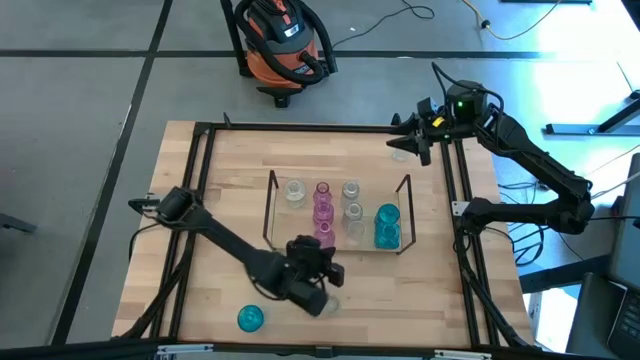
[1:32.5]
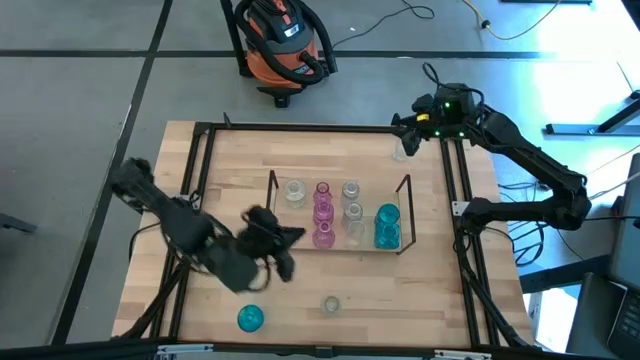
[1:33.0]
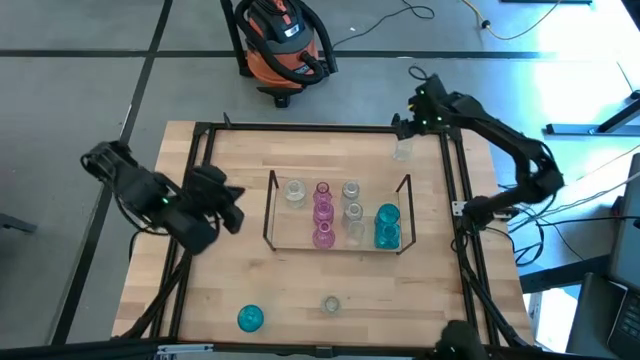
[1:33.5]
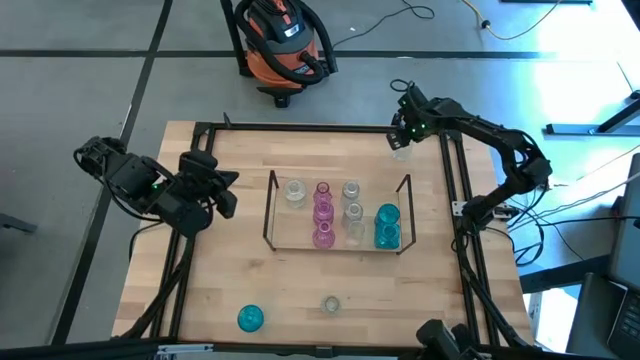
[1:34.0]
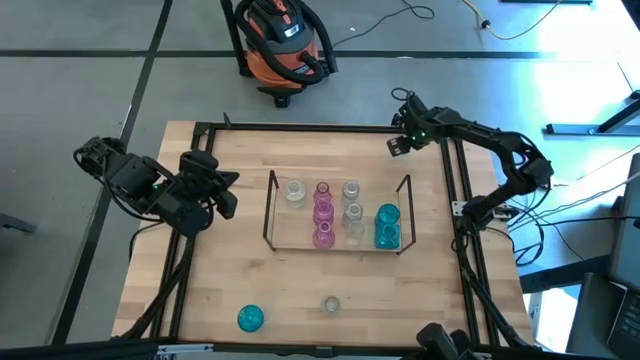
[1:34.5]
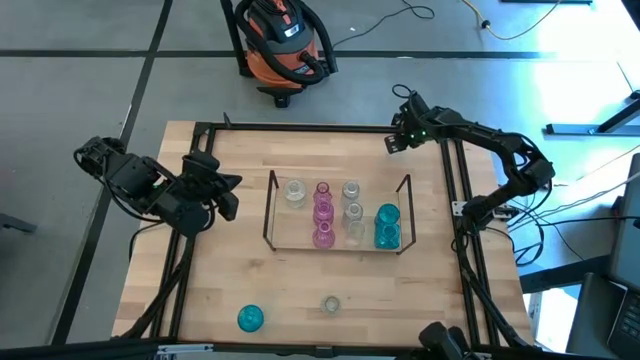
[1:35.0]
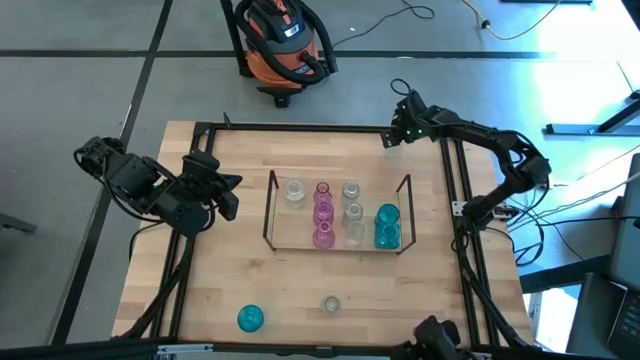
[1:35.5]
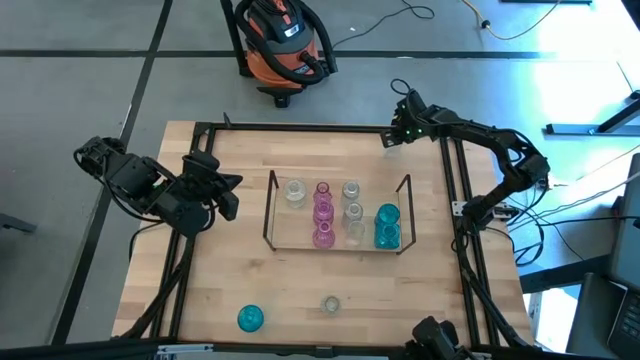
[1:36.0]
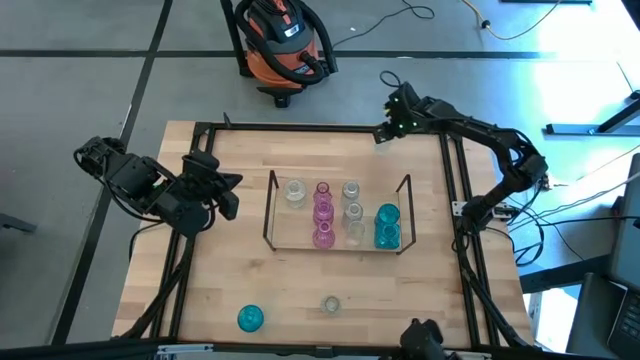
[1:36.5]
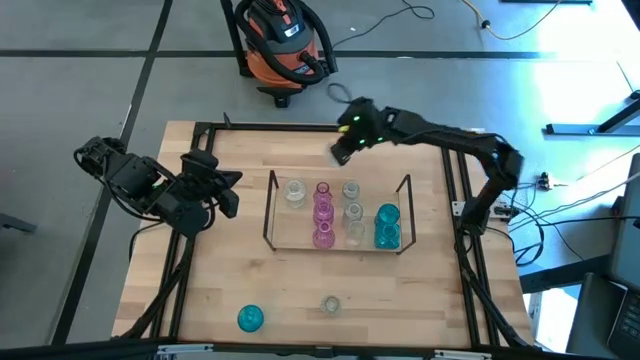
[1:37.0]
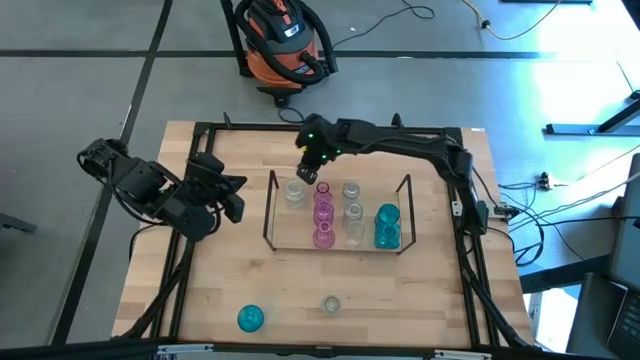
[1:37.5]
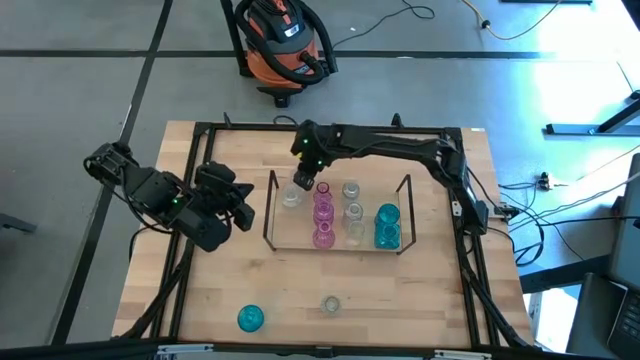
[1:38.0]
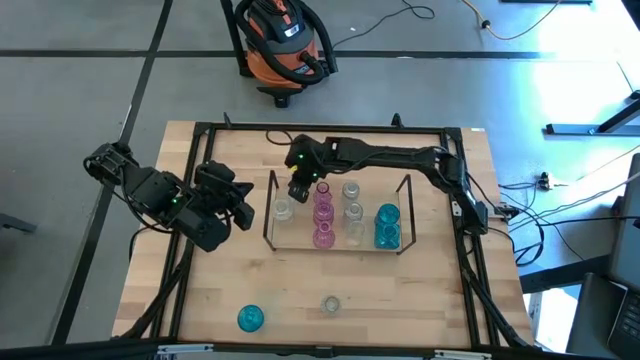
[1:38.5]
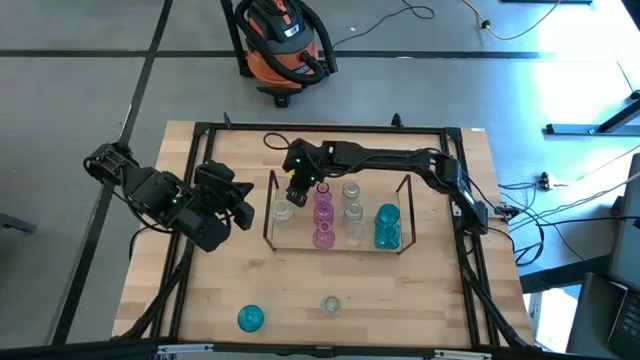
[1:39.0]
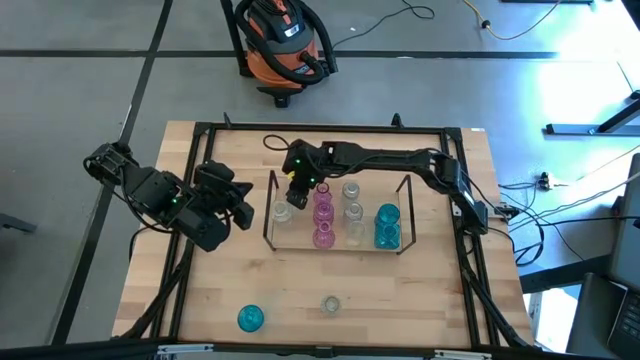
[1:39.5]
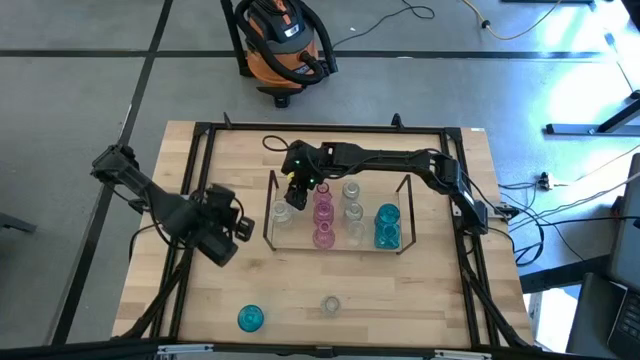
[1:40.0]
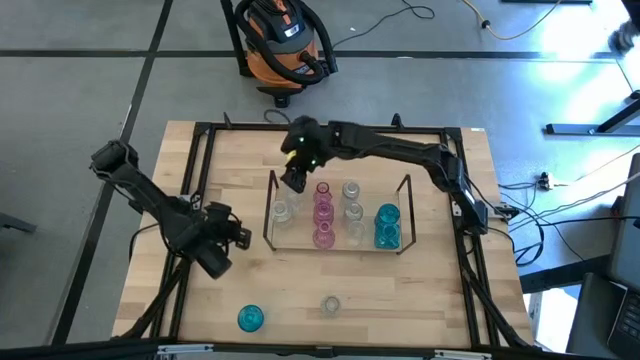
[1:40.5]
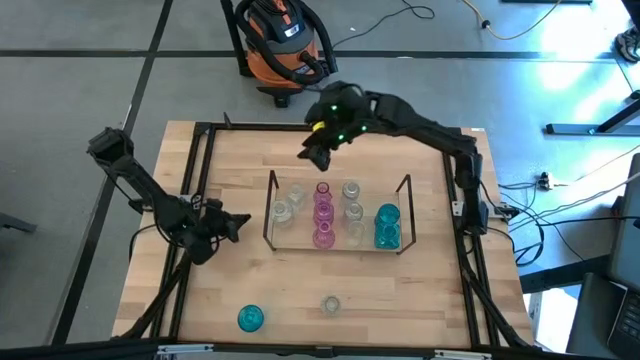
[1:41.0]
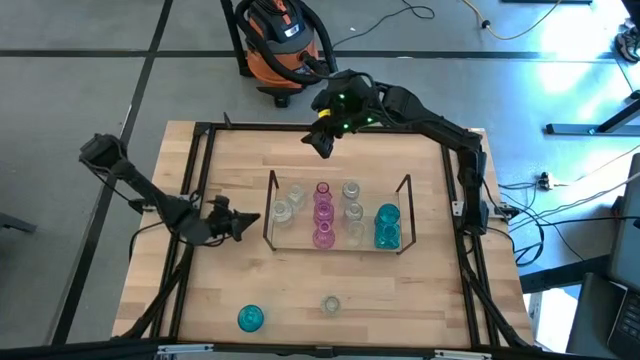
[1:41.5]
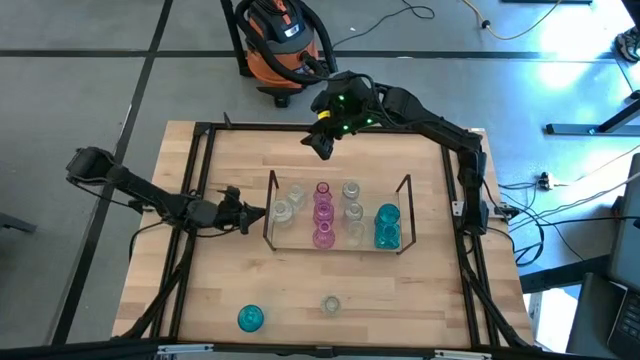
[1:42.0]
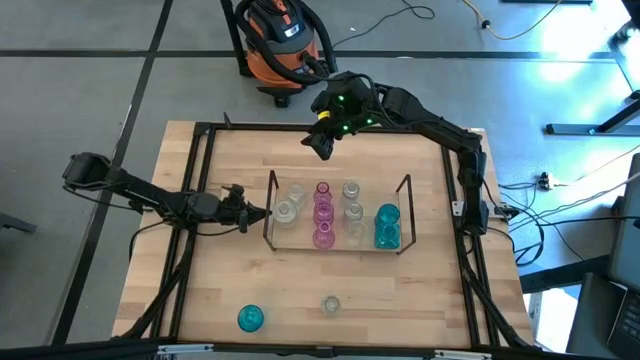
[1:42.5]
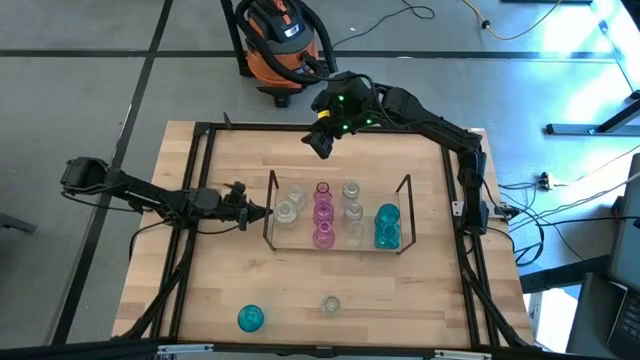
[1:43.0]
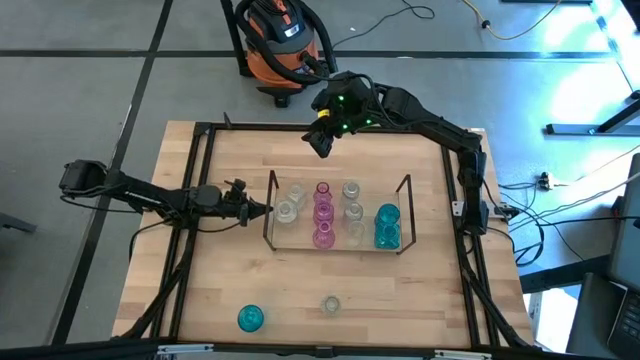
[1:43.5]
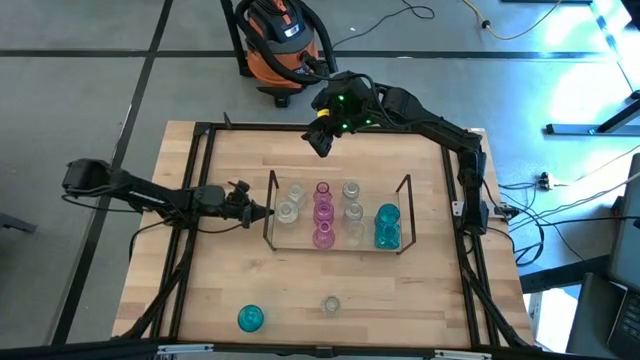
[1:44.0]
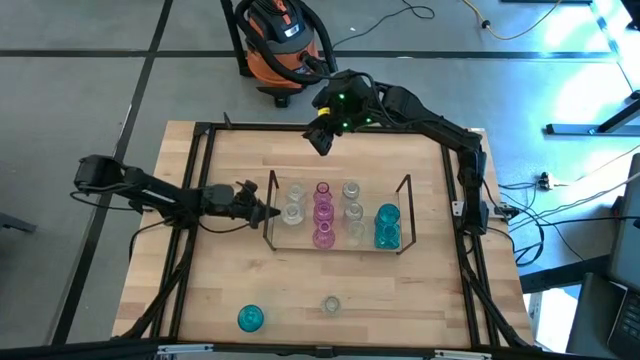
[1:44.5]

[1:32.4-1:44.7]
Task: sort vases onto shelf
Put the transparent vase aligned with the other transparent vase on the shelf

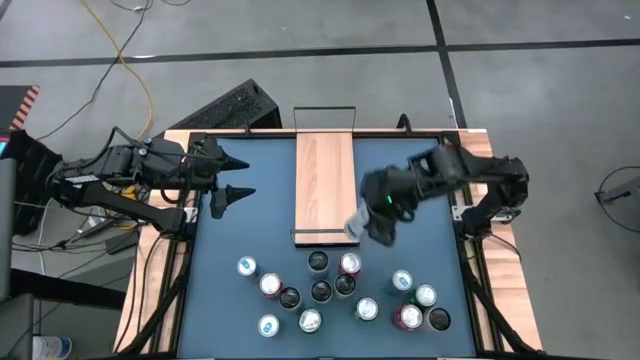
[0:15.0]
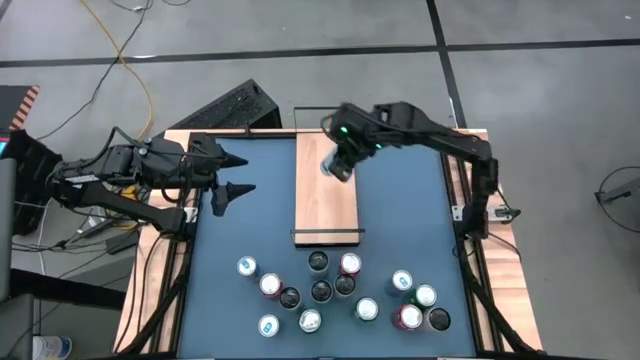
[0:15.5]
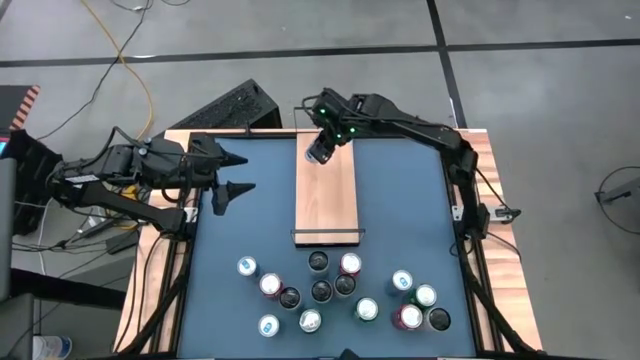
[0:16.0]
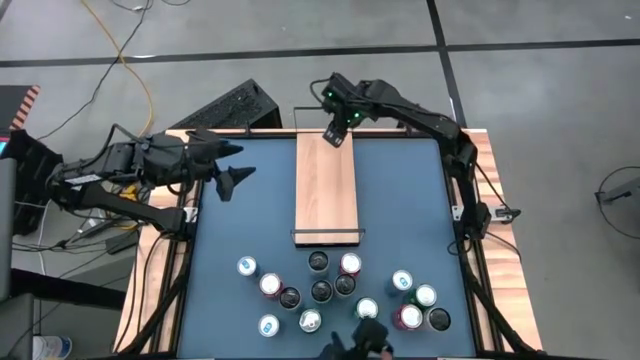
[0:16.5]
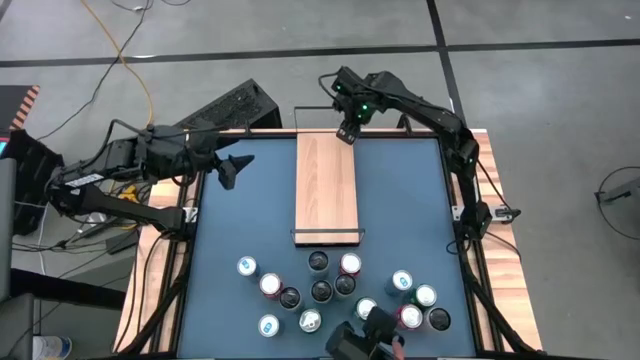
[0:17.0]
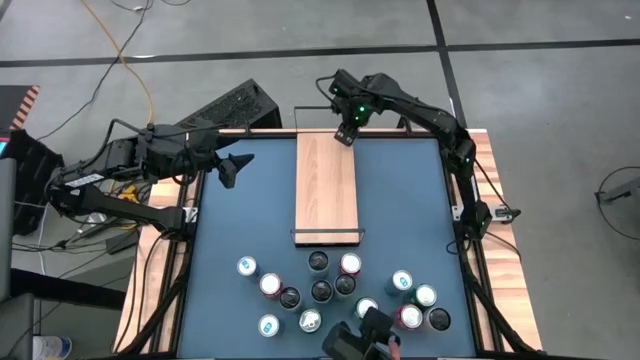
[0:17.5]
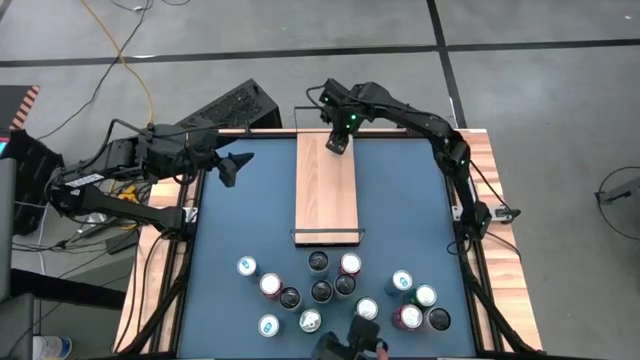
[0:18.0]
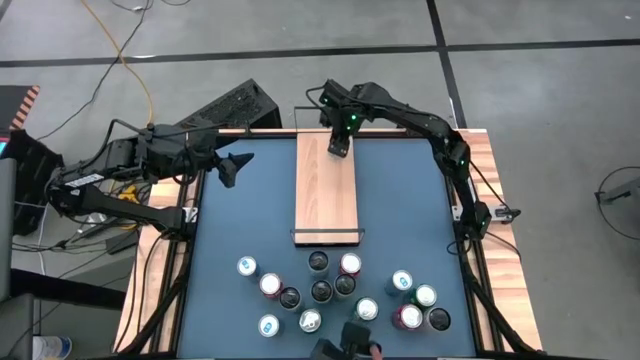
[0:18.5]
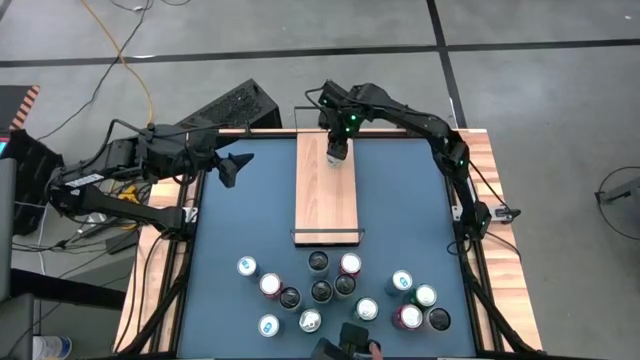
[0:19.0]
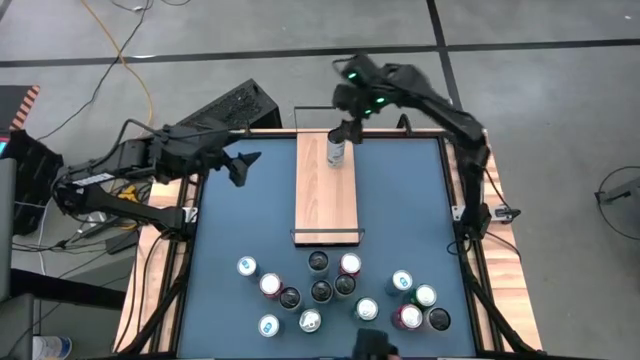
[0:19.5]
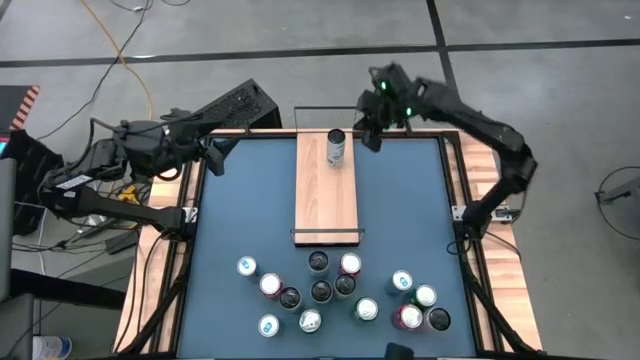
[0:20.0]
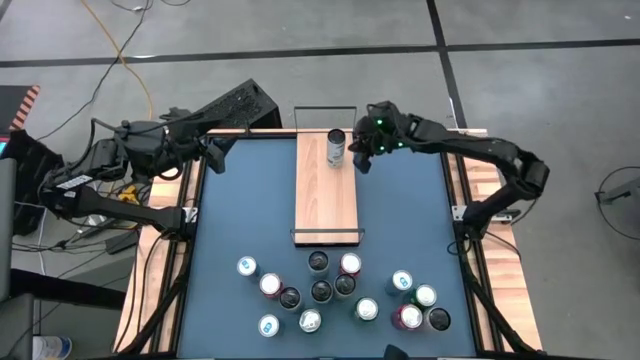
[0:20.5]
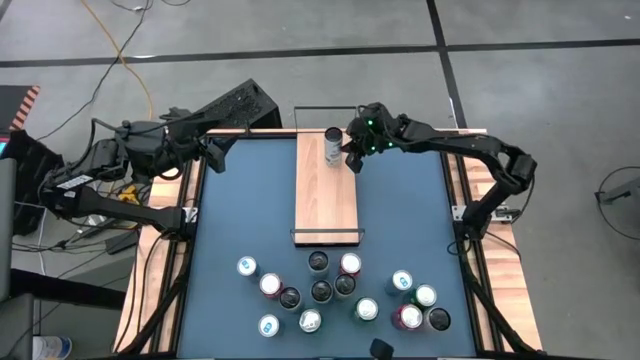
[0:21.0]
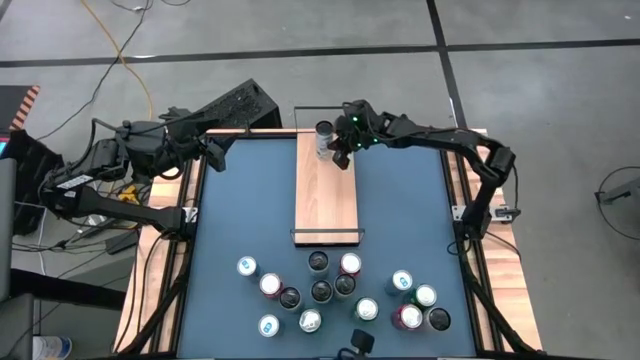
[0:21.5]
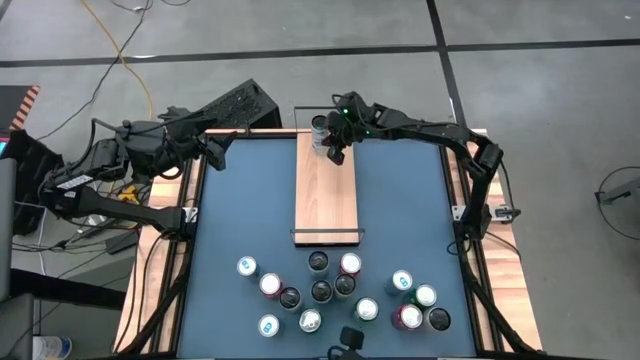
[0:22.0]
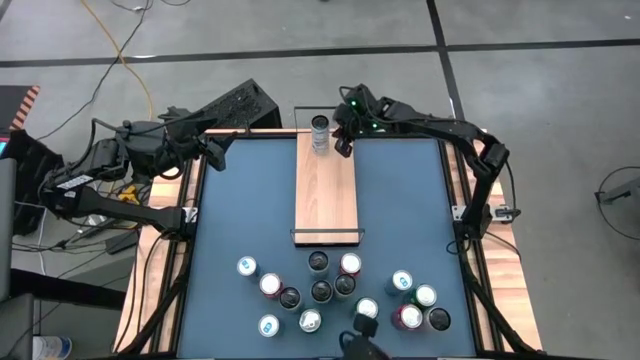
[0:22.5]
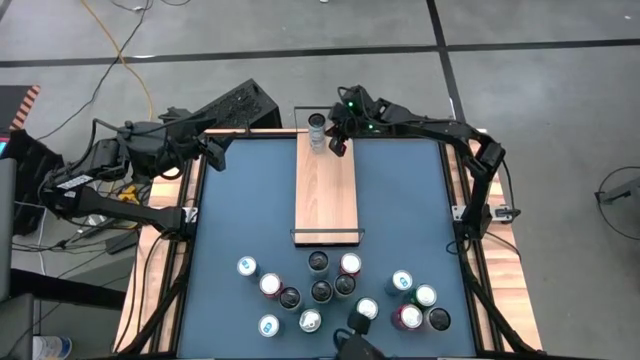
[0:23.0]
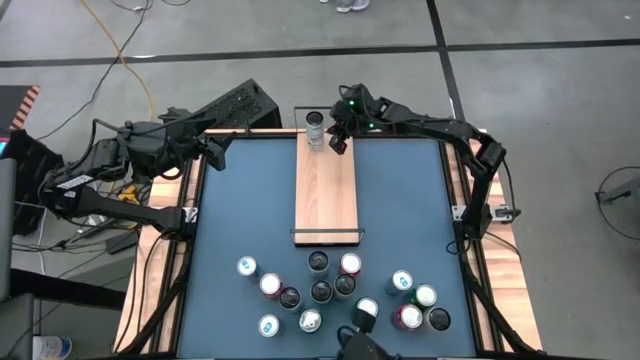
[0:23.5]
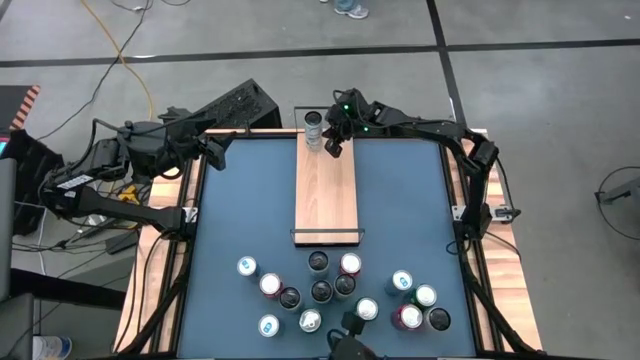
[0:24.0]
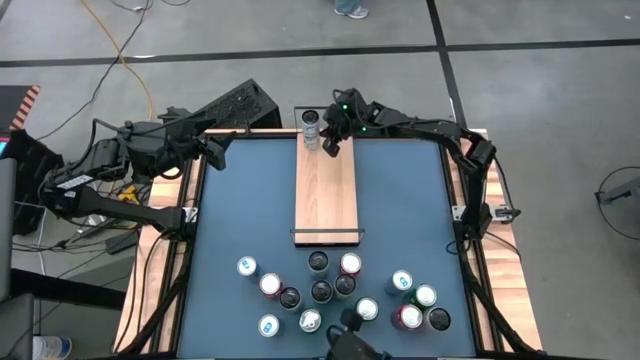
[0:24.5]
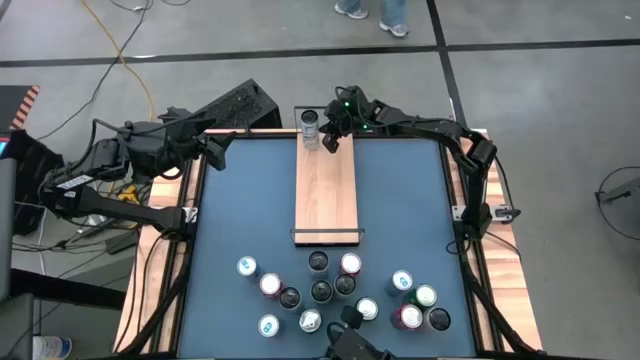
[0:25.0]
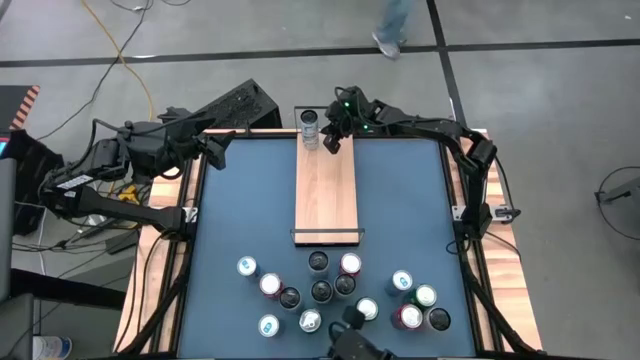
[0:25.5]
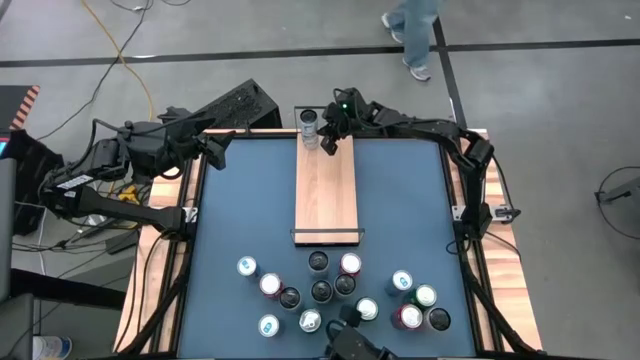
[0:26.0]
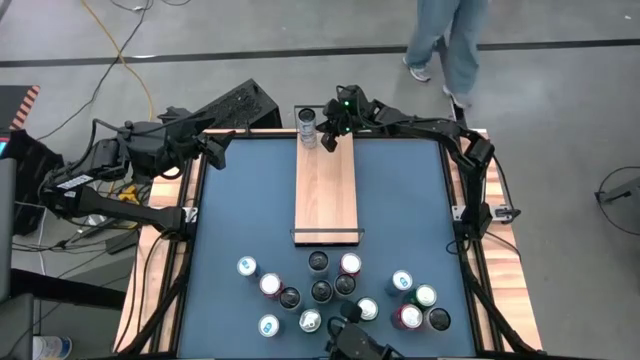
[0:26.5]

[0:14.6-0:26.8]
Task: Place canned beverage on shelf
Put the bottom right white blue soda can on the shelf
